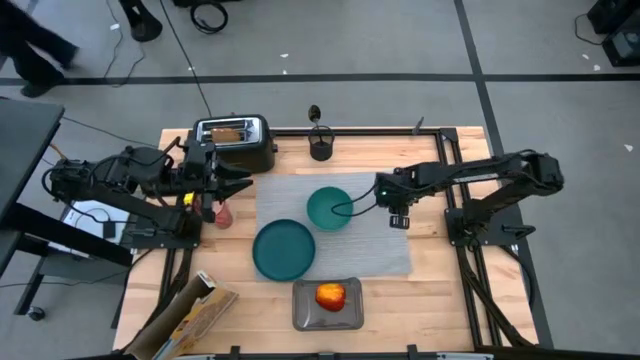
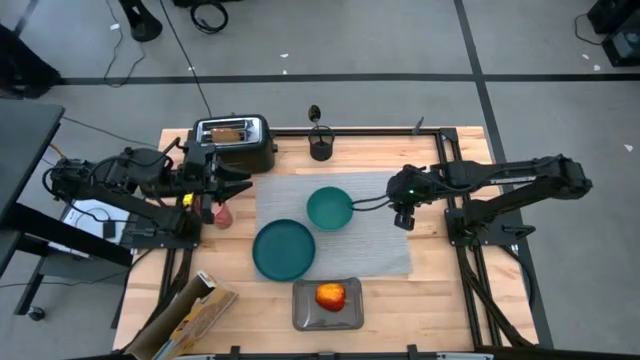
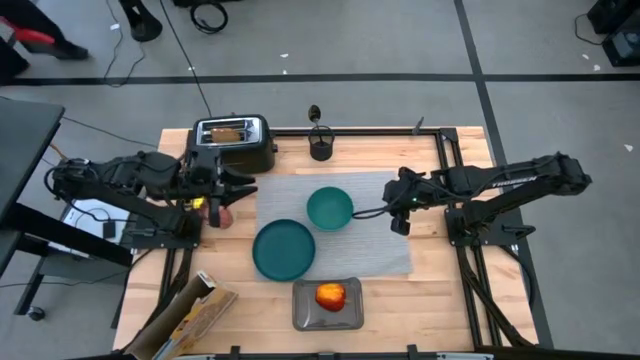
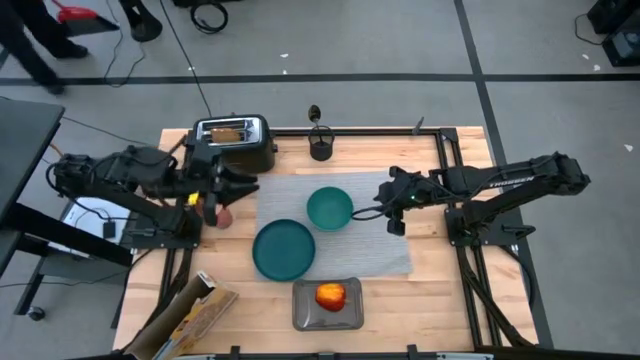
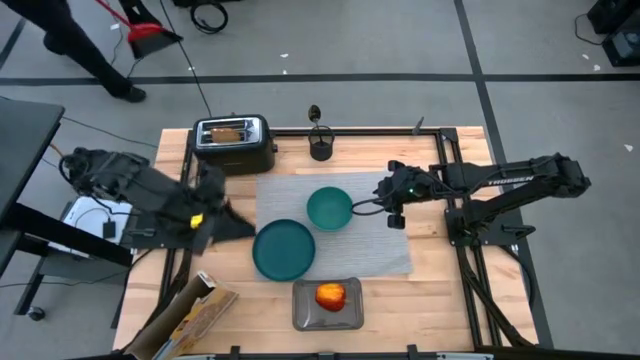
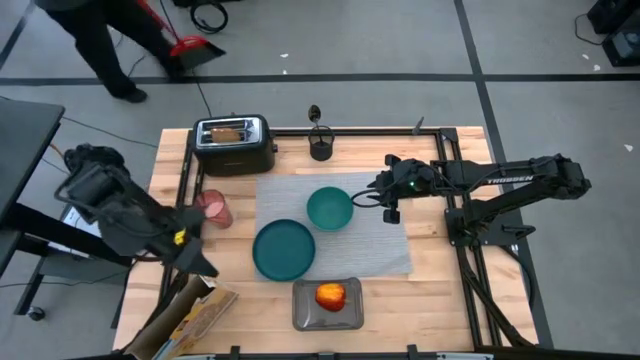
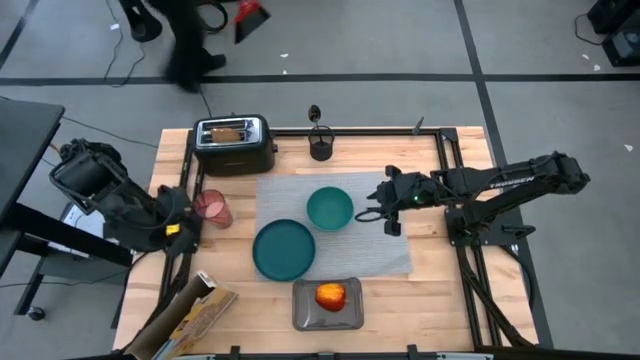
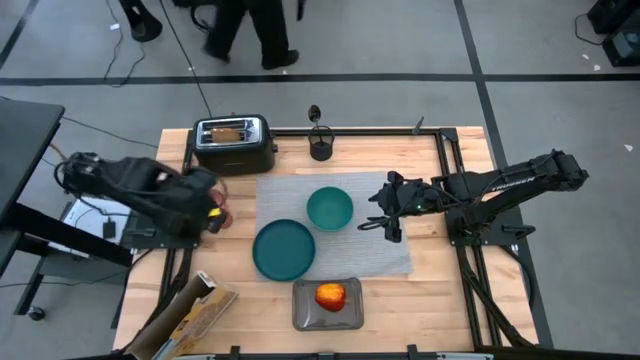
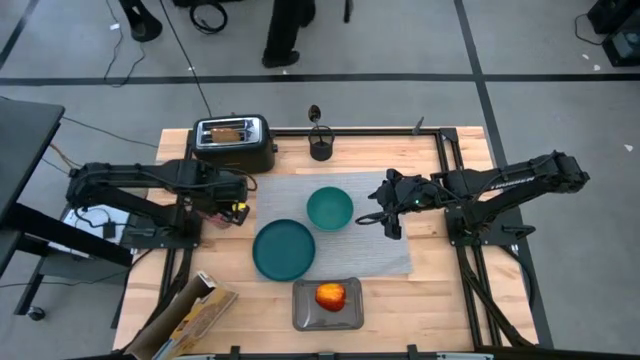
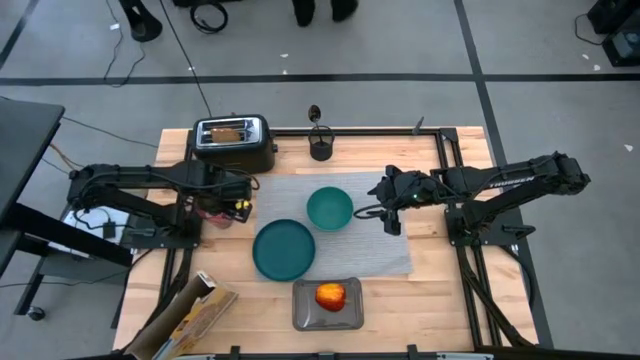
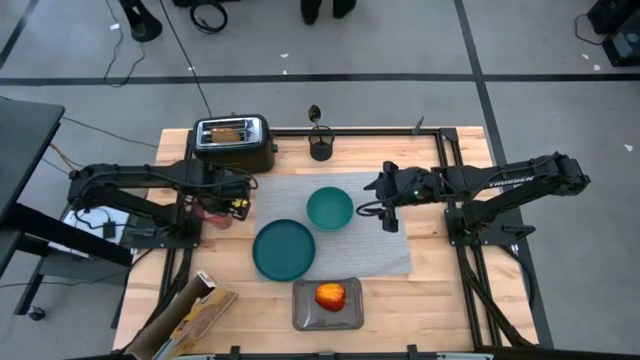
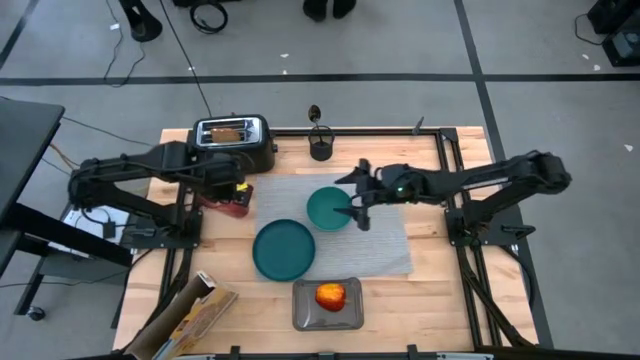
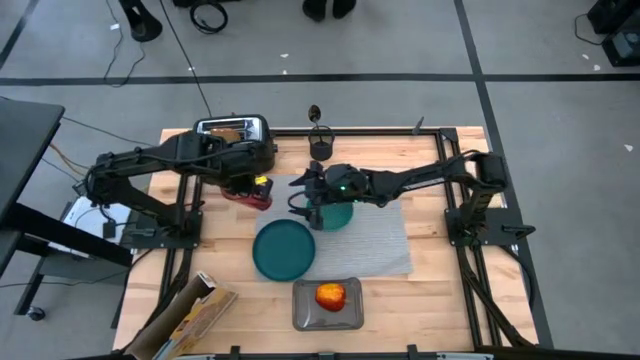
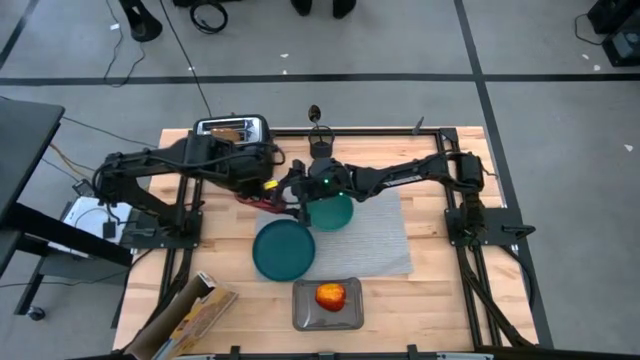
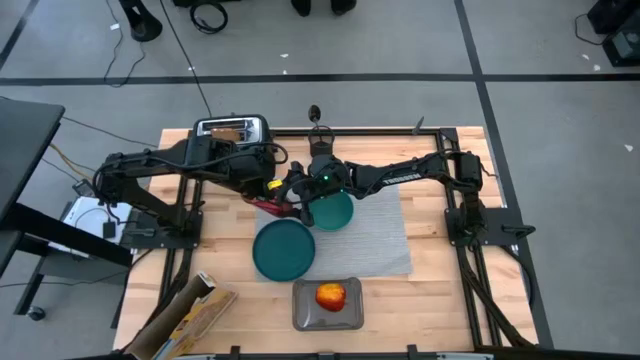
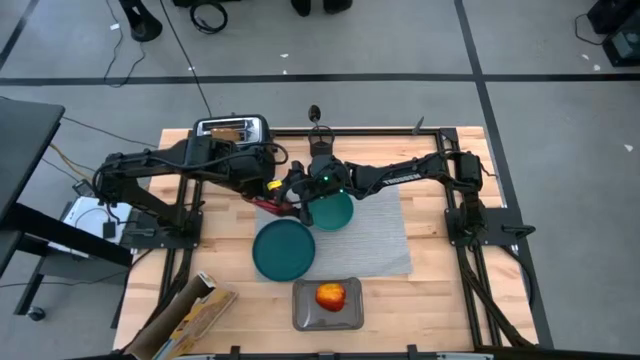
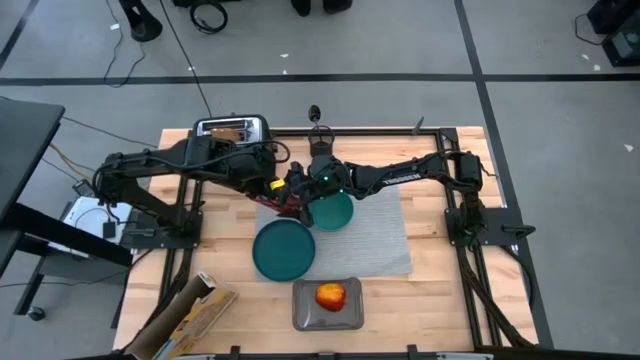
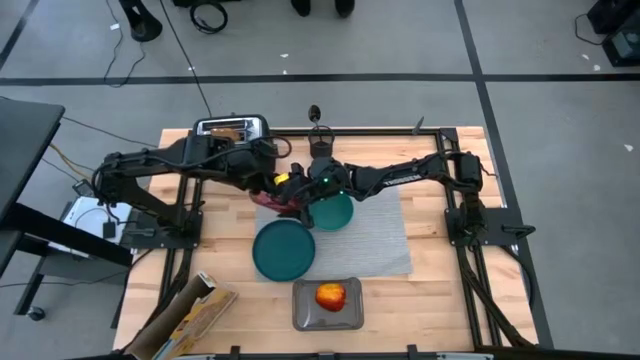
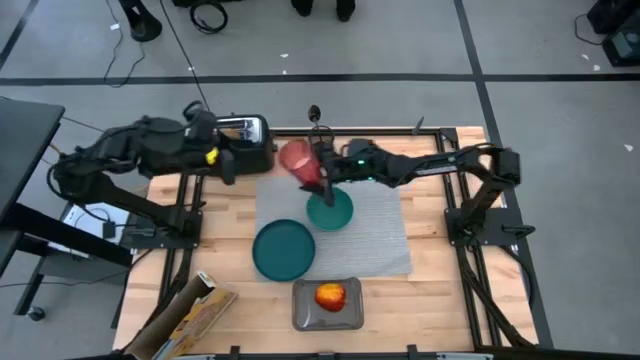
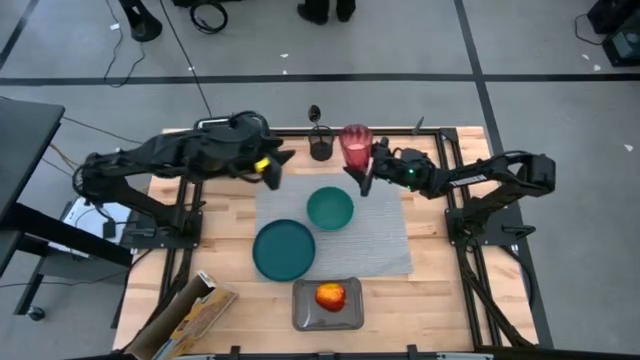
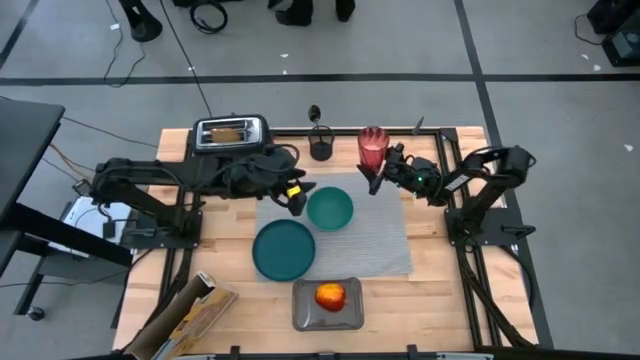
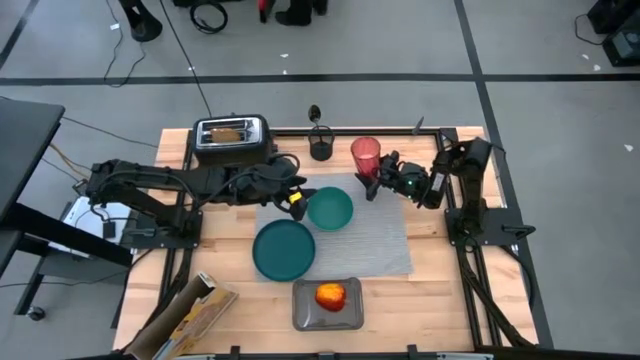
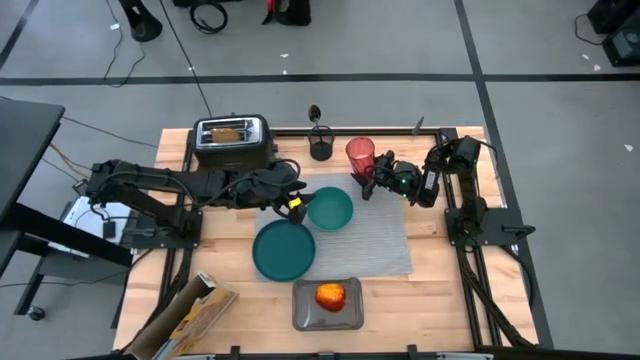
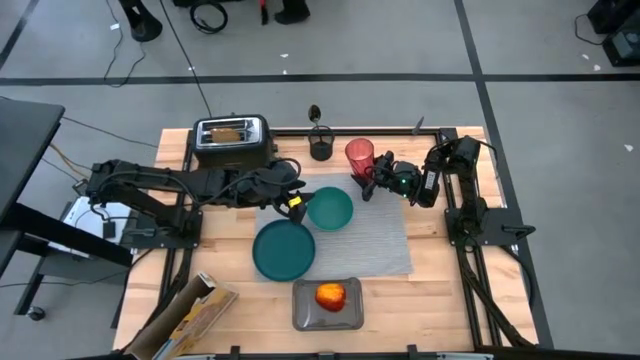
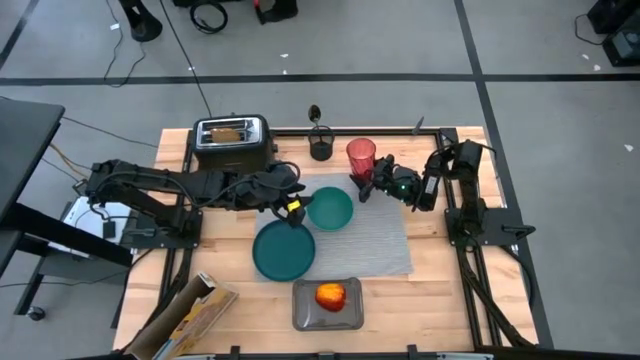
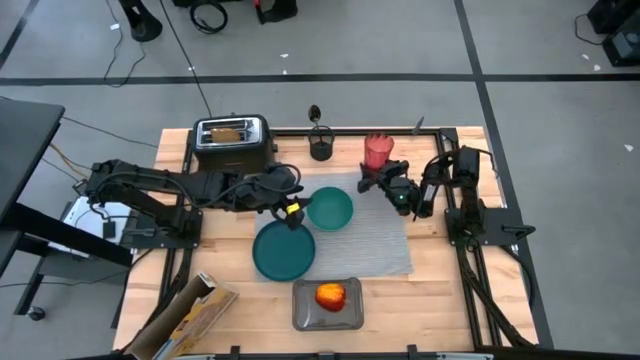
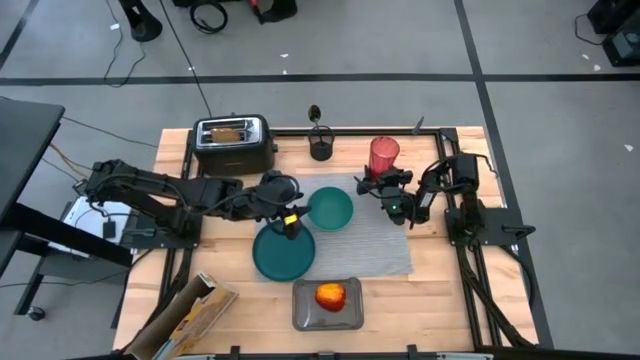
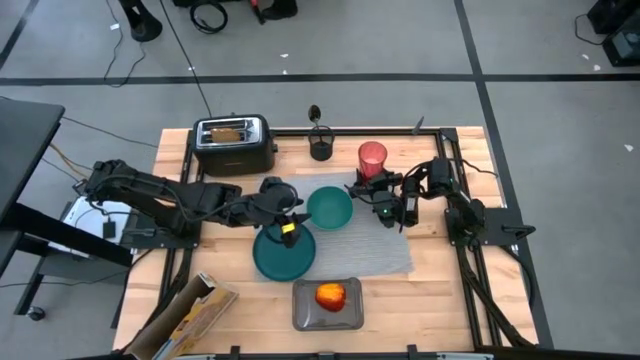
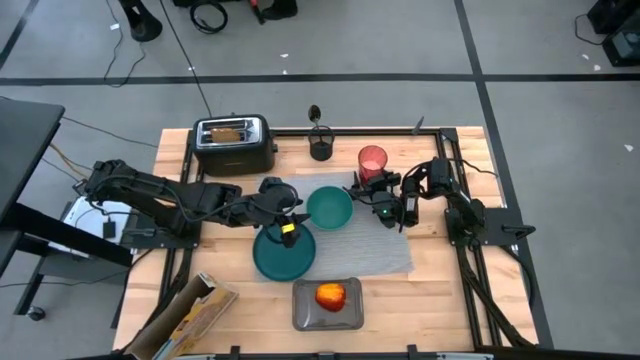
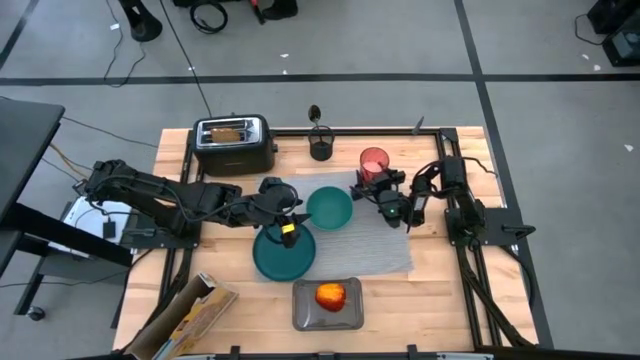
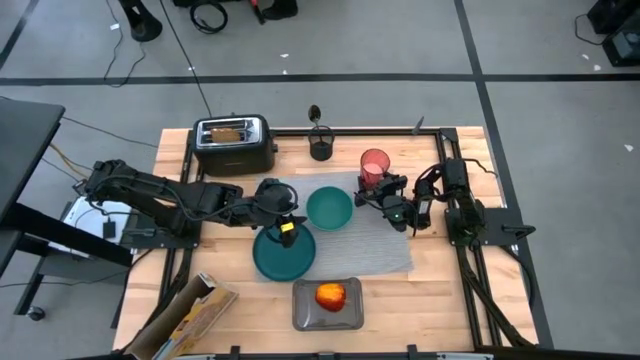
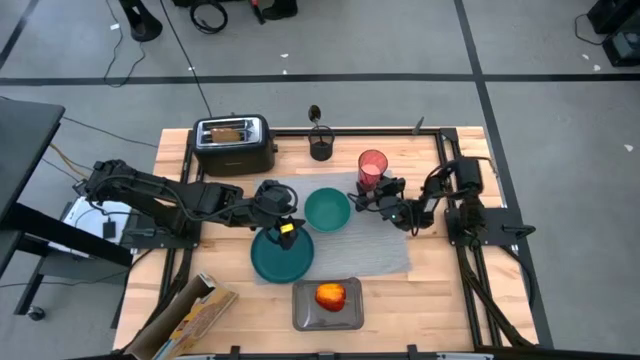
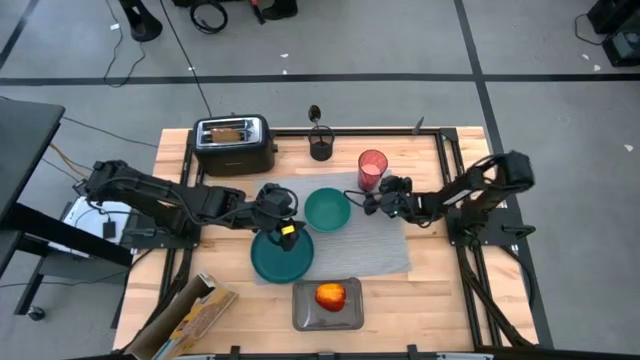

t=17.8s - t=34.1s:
Task: Arrange a breakfast setting
Put the red cup of milk on the gray tablemat to the top right of the green bowl

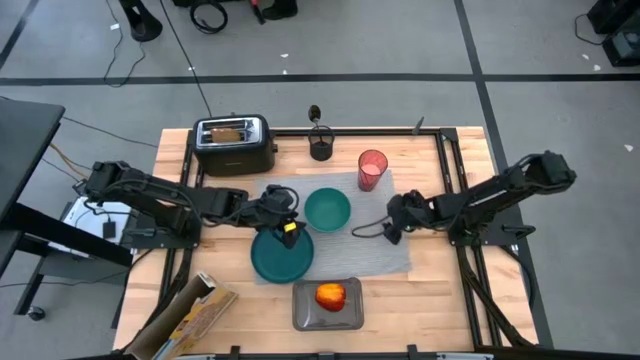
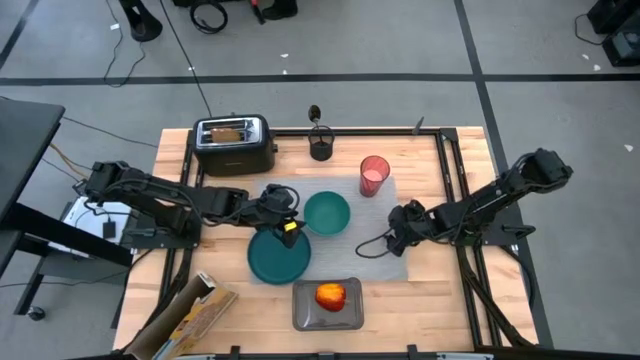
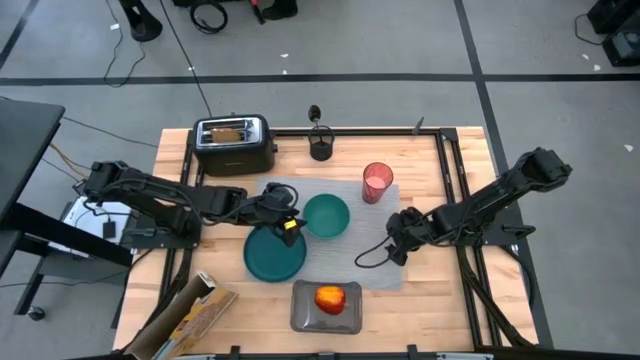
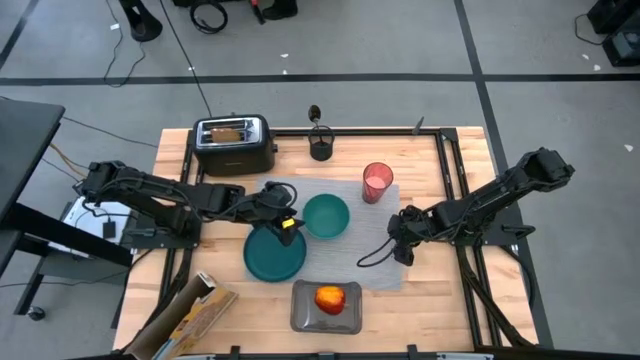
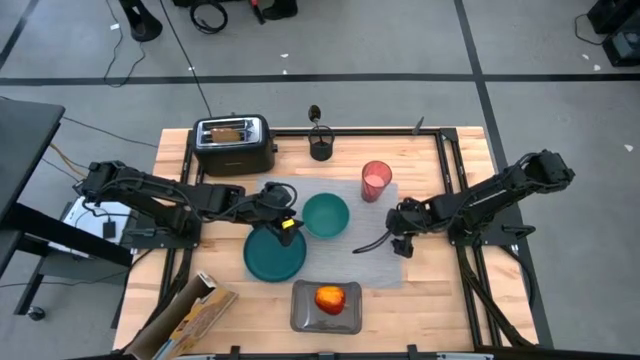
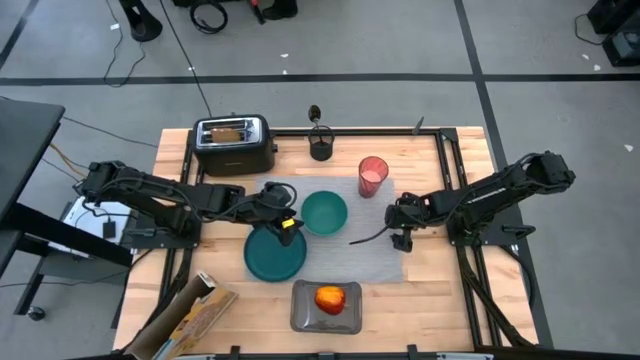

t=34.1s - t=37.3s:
Adjust the gray tablemat

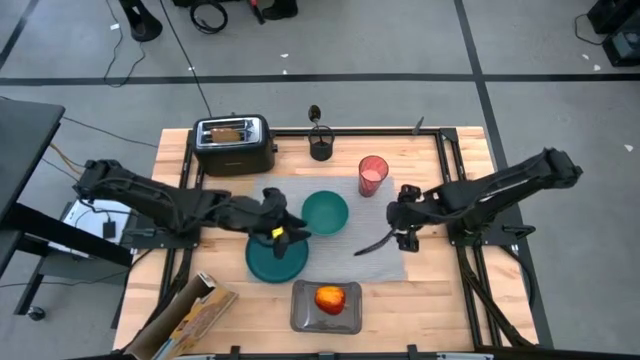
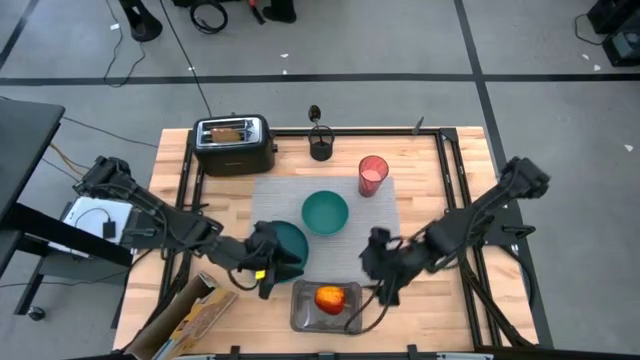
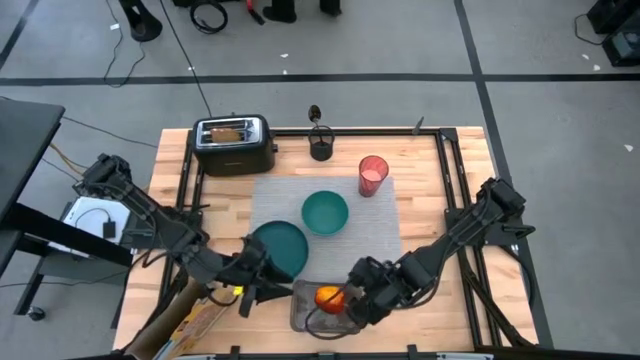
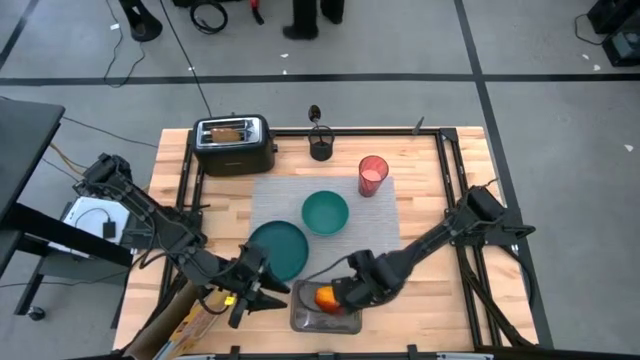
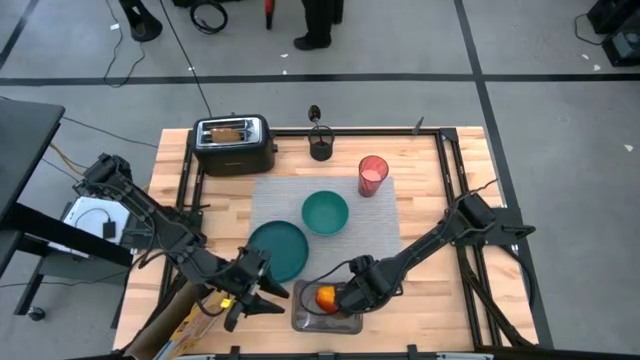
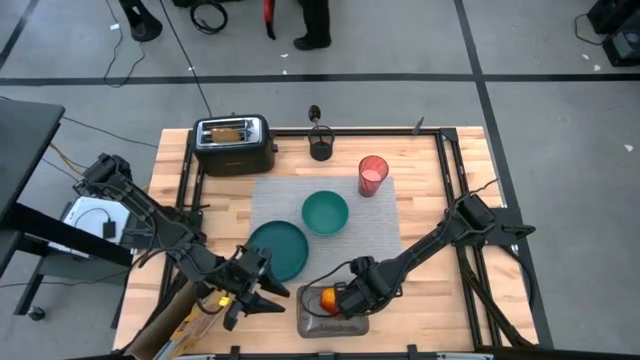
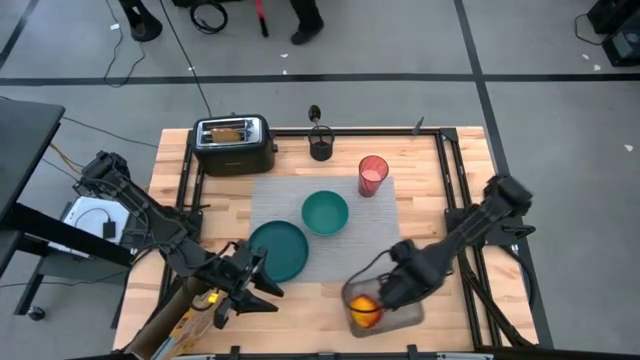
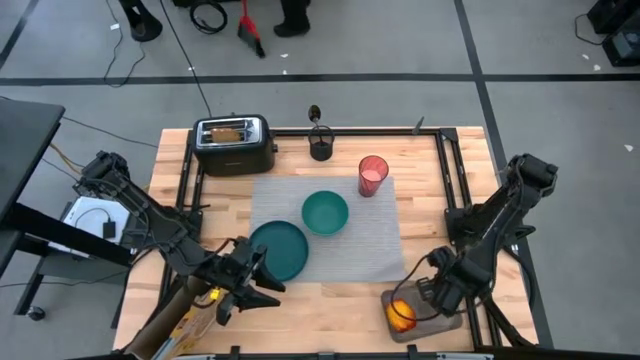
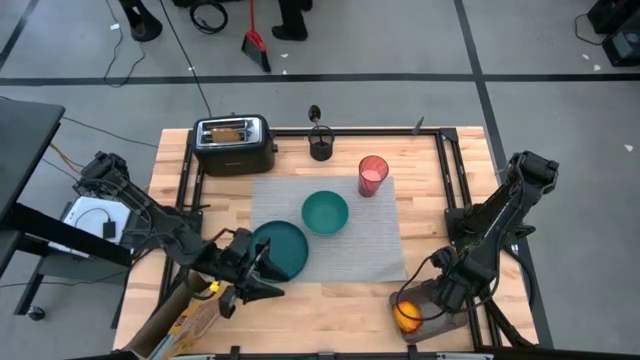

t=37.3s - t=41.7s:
Move the black bin to the lower right of the table
